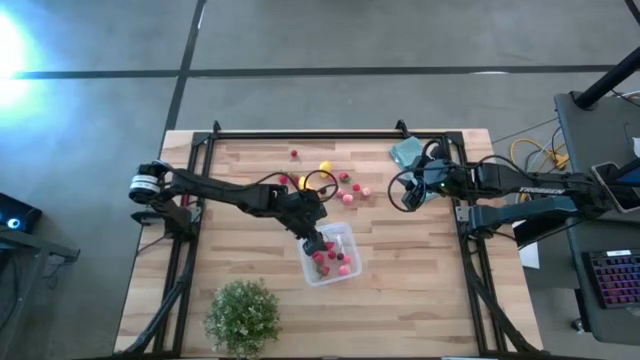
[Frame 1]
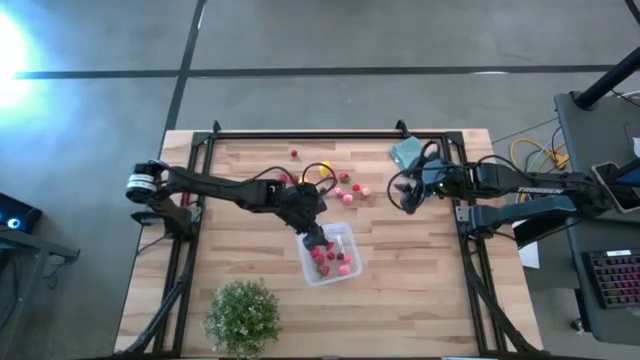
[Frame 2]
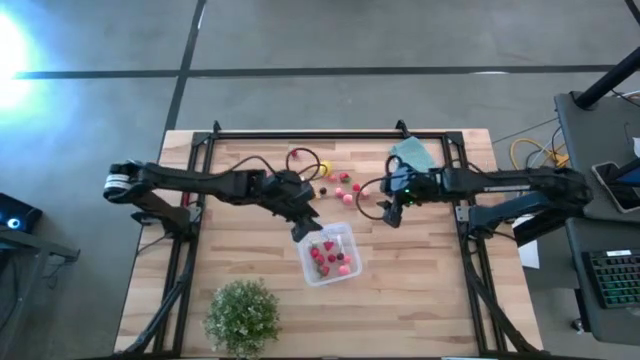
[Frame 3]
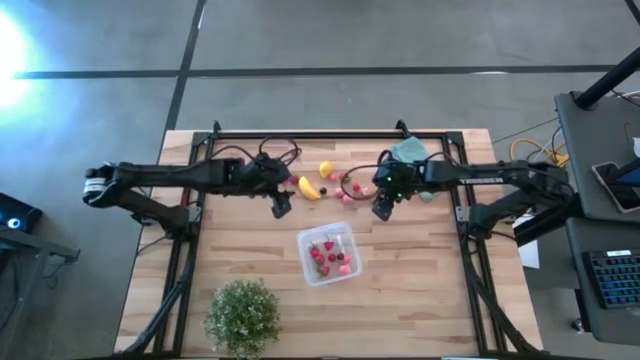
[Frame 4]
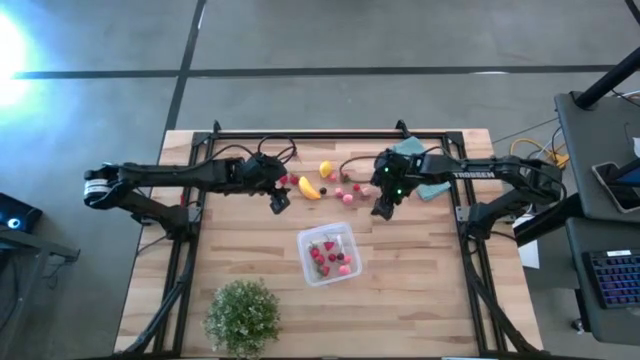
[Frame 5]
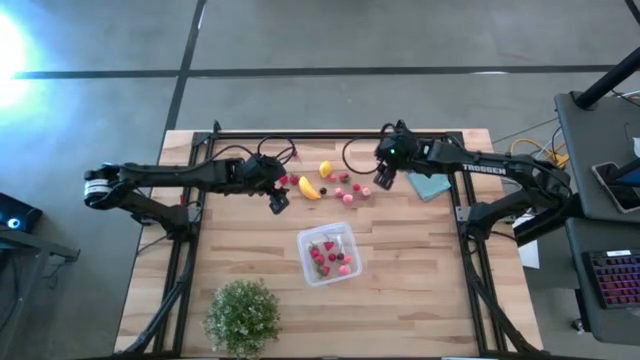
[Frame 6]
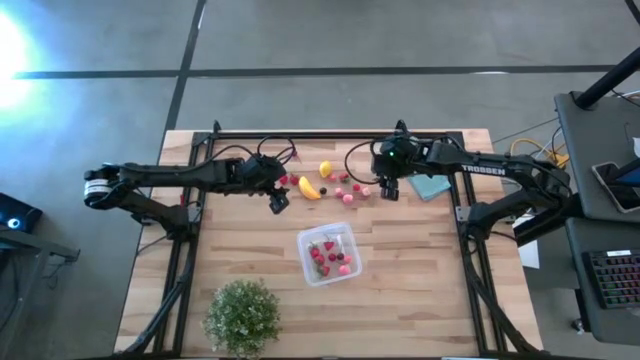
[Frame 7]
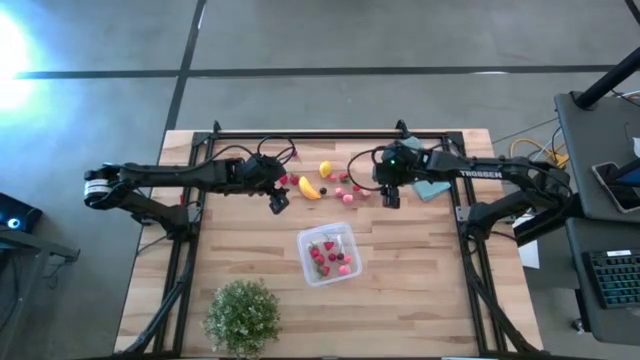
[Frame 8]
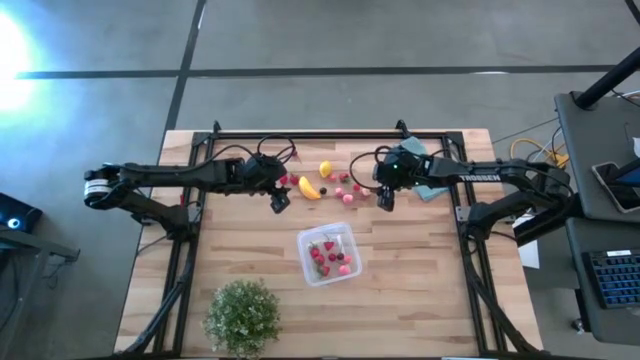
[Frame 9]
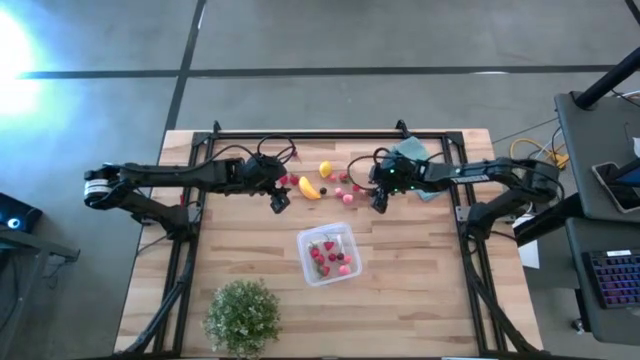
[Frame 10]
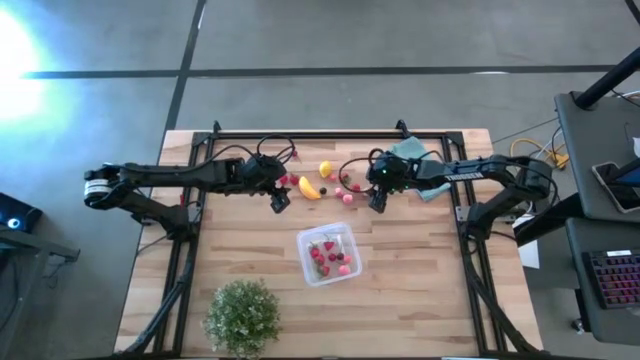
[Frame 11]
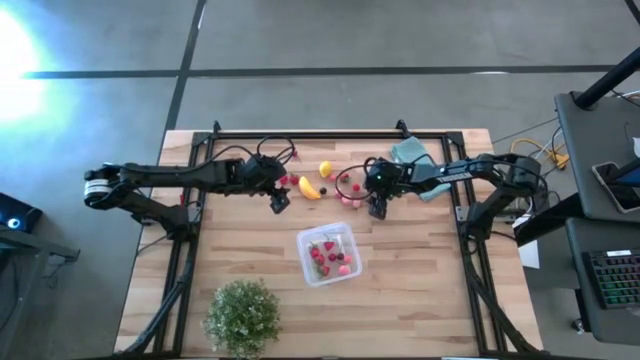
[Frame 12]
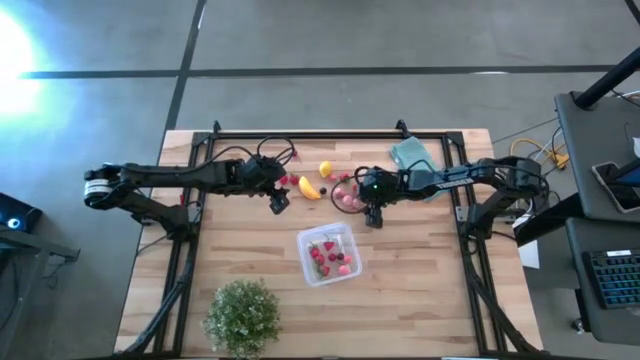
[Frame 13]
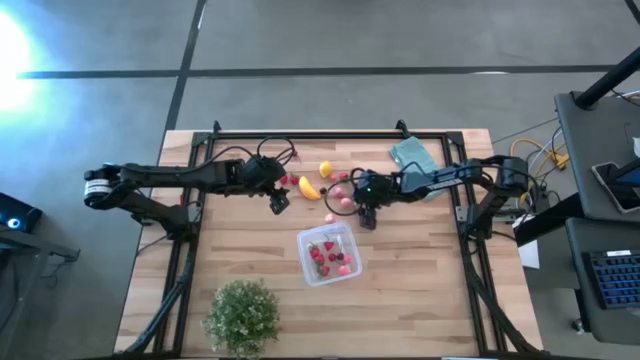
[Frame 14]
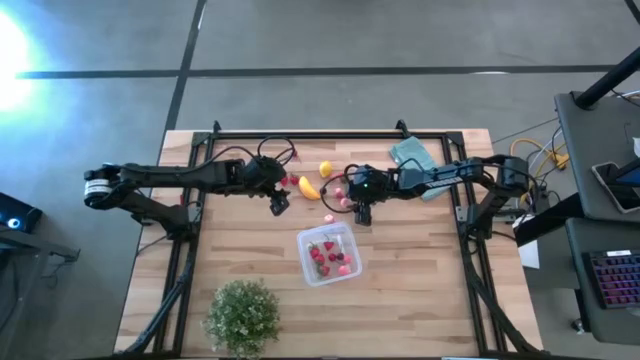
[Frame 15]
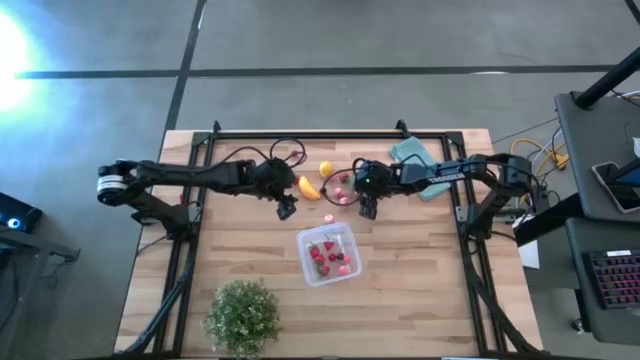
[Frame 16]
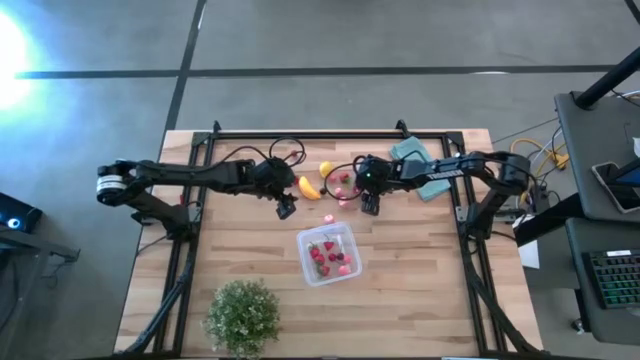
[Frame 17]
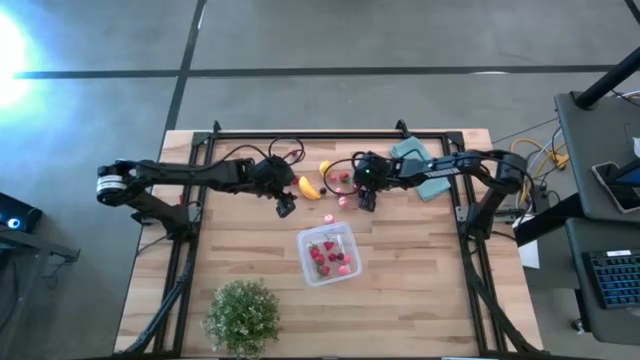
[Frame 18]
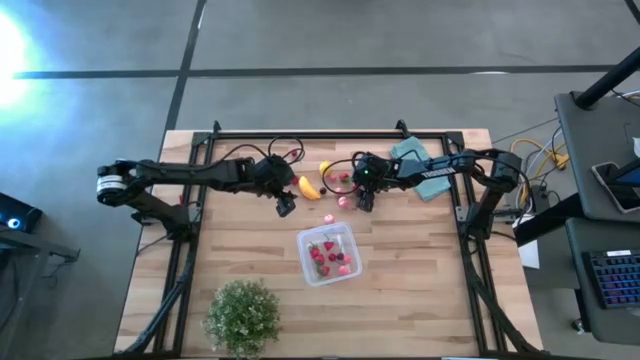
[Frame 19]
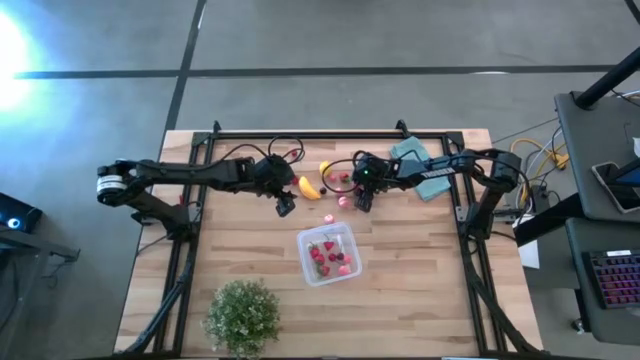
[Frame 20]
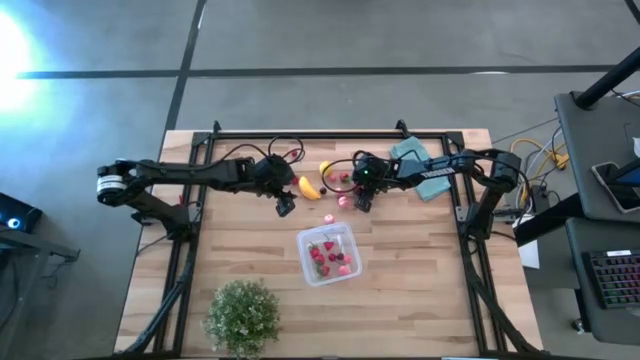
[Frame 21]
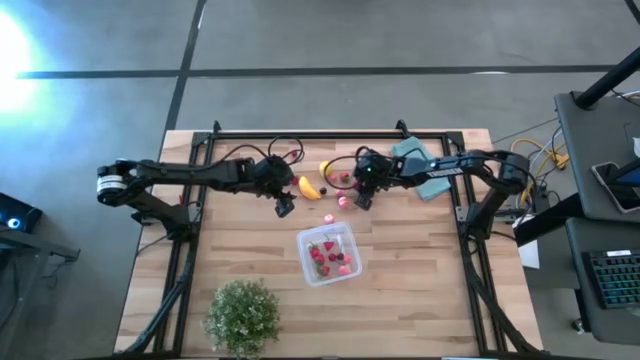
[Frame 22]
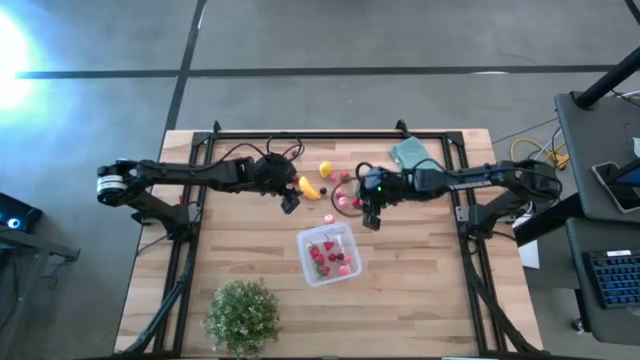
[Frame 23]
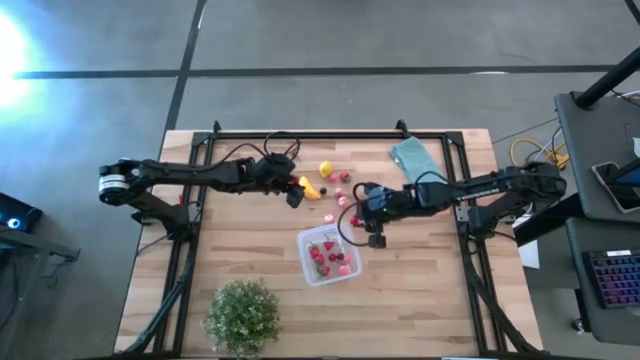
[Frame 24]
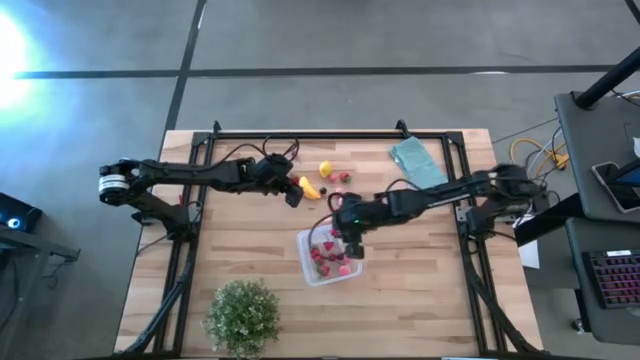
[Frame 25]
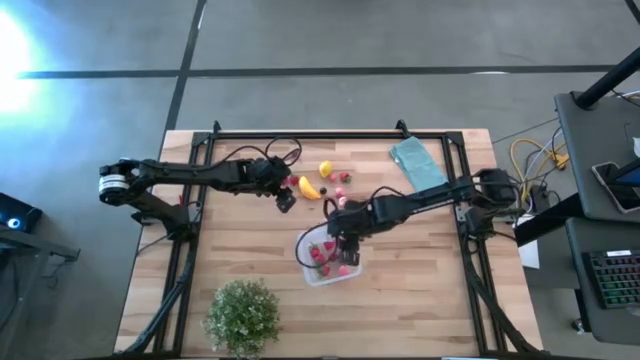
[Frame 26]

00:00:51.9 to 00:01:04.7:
Task: Pick and placing Produce into tupperware
Put the red cherry into the transparent bin

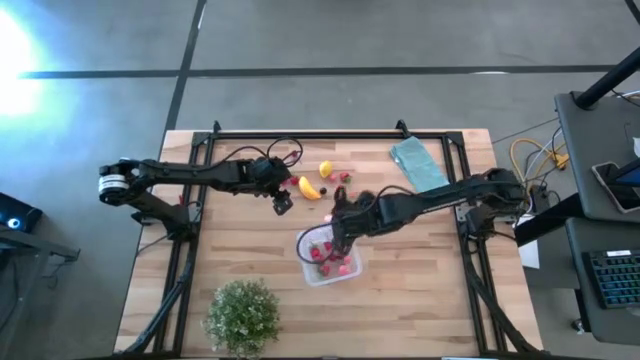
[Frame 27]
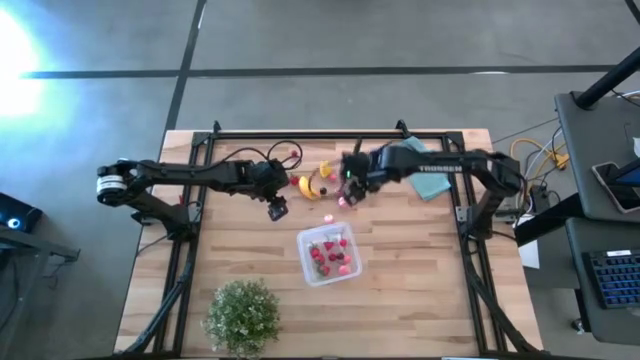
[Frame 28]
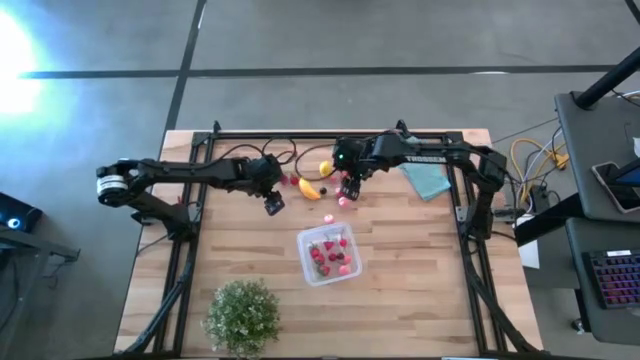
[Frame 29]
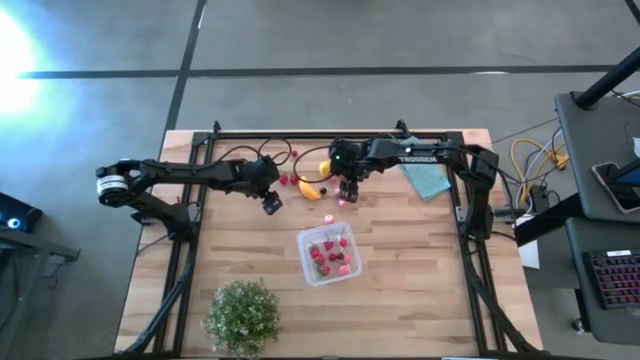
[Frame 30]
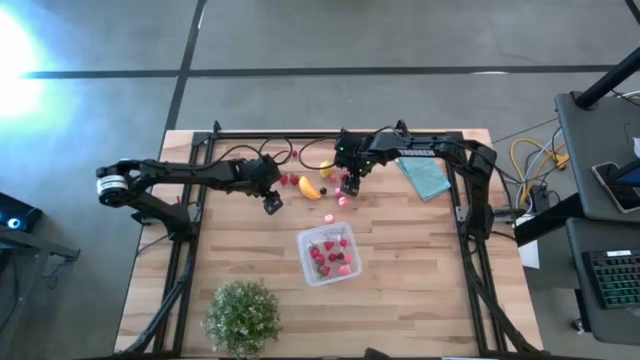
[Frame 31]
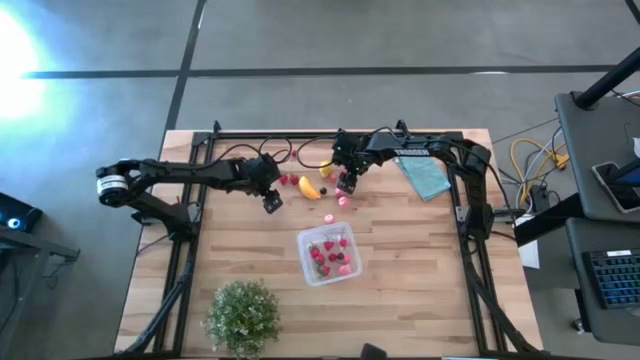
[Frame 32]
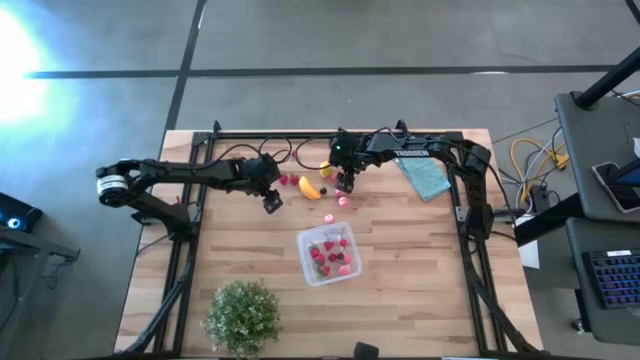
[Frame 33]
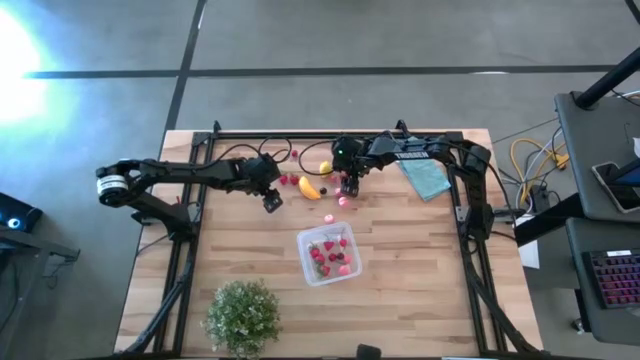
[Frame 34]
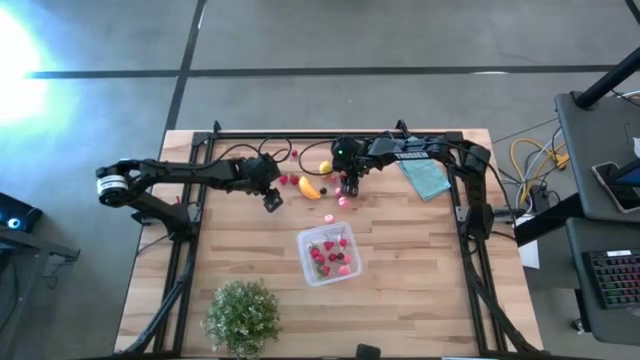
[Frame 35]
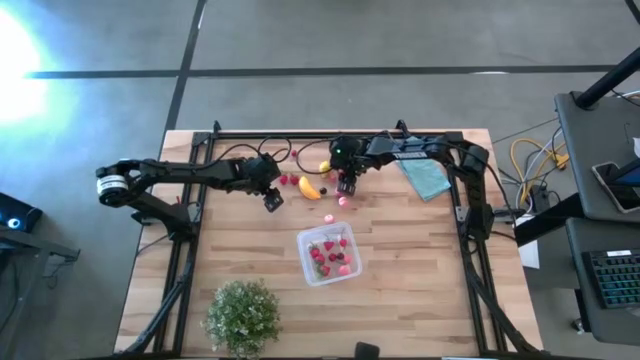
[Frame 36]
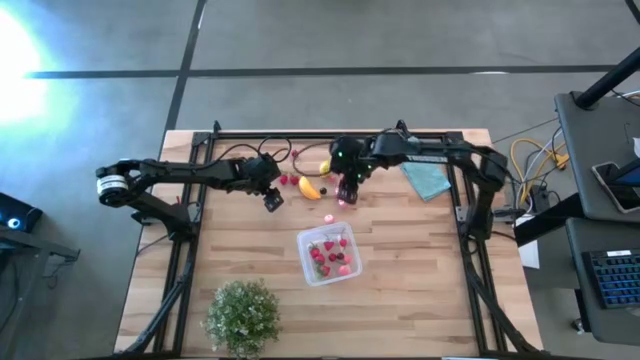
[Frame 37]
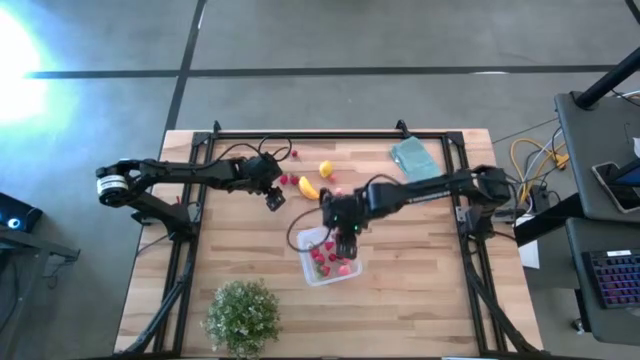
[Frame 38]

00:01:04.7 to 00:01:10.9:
Put the strawberry into the transparent bin

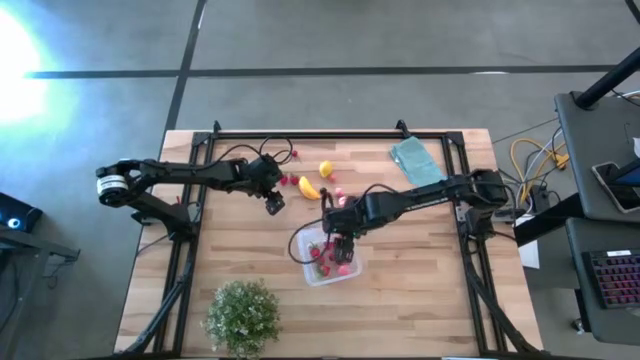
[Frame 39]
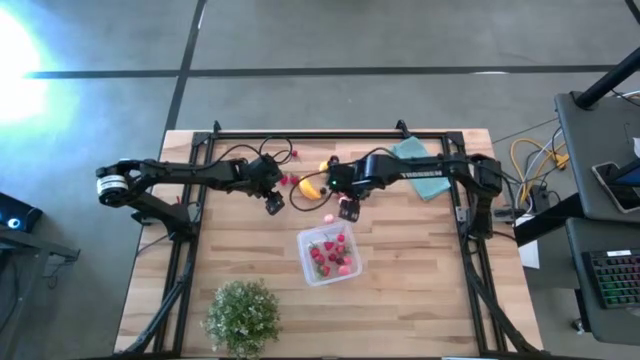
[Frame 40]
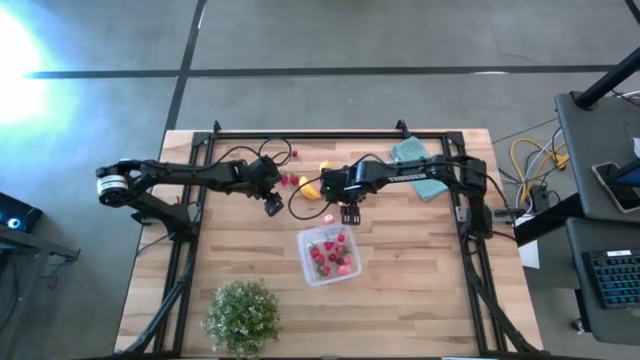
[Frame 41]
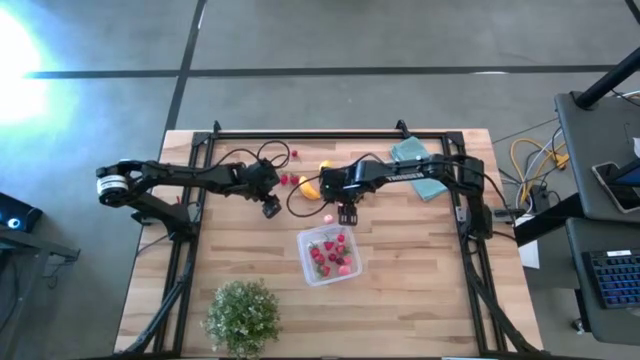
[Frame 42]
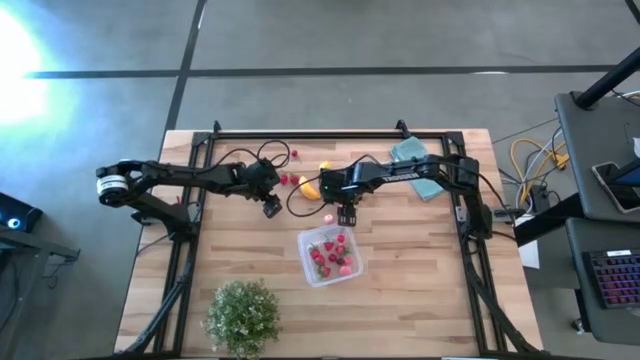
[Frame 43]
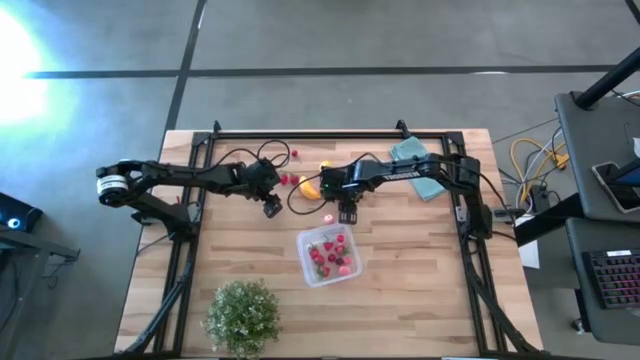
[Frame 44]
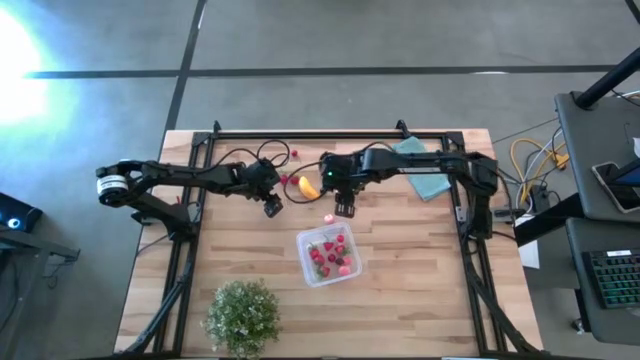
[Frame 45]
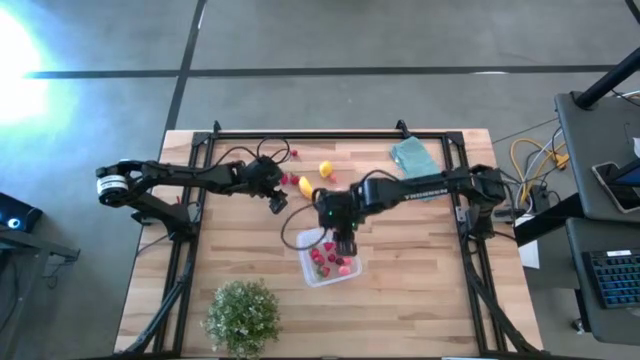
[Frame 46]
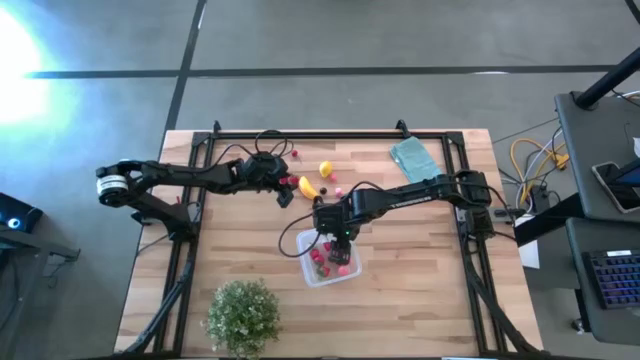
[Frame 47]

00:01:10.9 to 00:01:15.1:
Put the peach into the transparent bin
